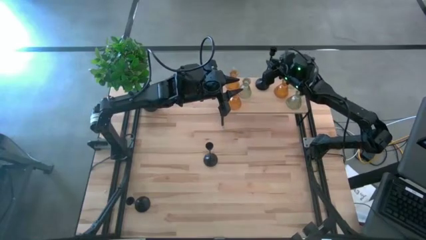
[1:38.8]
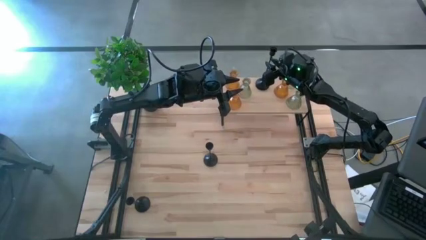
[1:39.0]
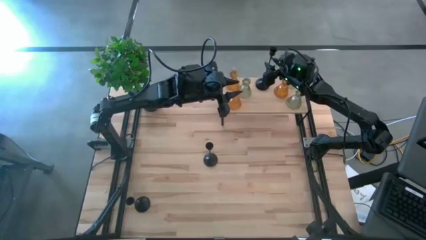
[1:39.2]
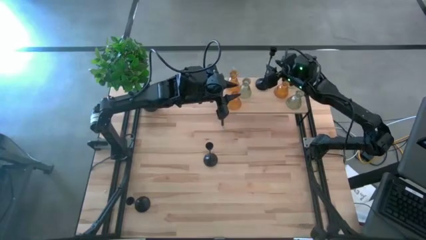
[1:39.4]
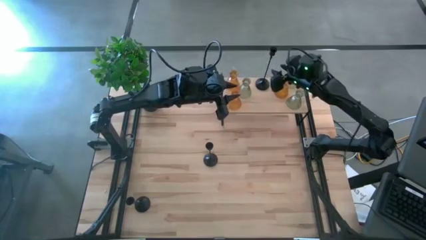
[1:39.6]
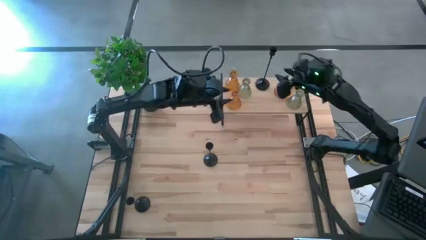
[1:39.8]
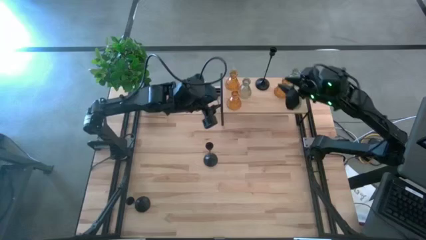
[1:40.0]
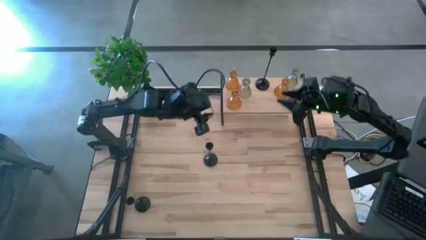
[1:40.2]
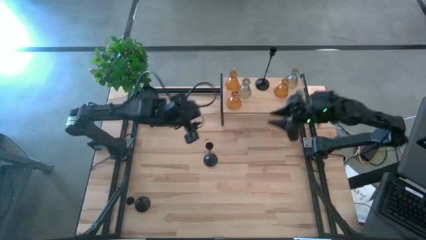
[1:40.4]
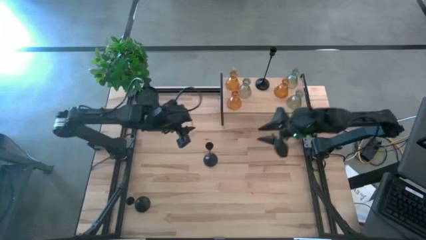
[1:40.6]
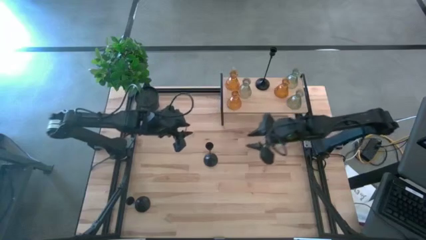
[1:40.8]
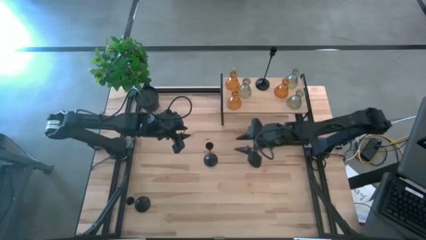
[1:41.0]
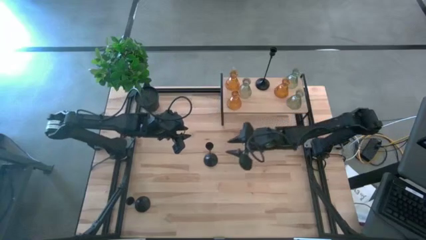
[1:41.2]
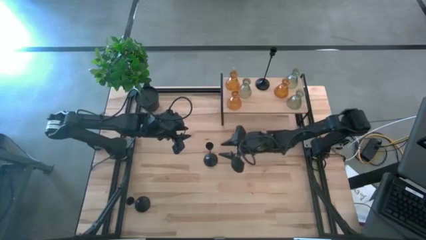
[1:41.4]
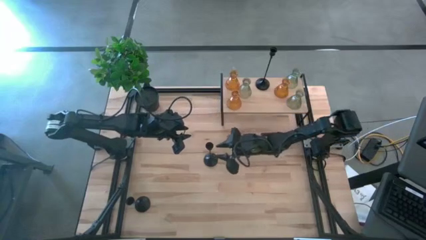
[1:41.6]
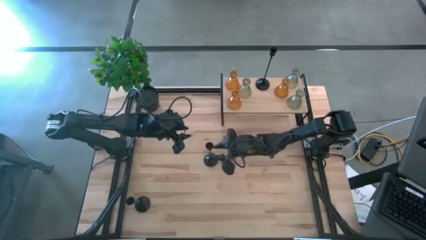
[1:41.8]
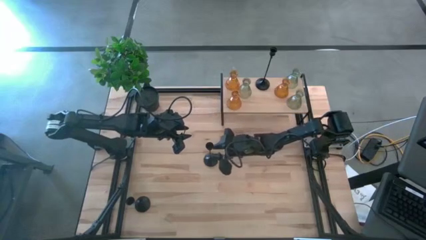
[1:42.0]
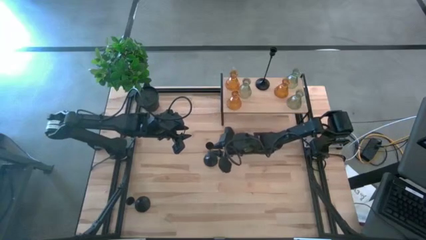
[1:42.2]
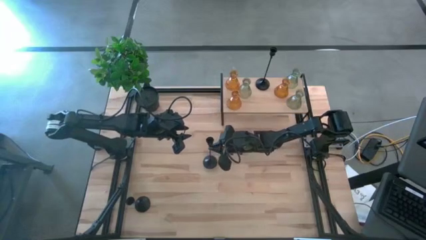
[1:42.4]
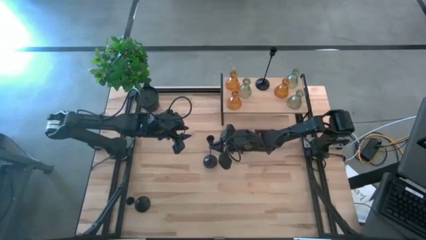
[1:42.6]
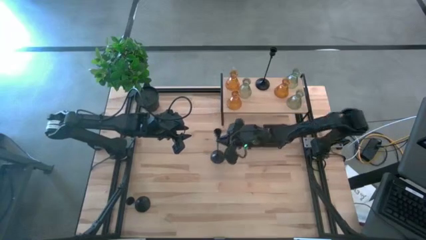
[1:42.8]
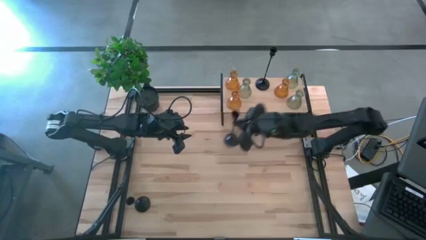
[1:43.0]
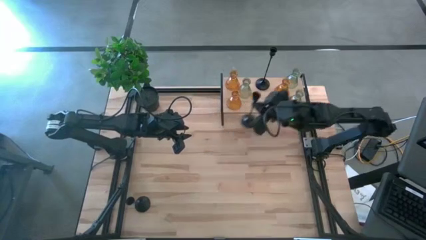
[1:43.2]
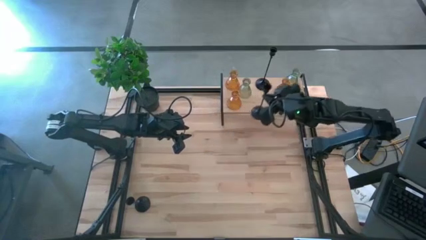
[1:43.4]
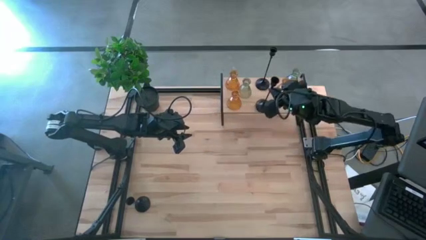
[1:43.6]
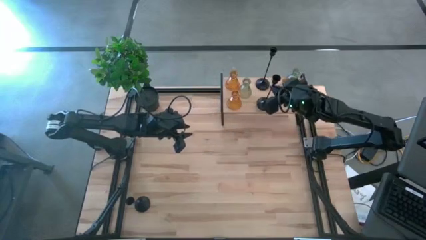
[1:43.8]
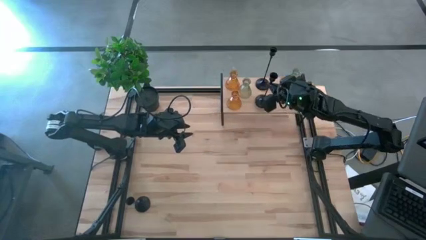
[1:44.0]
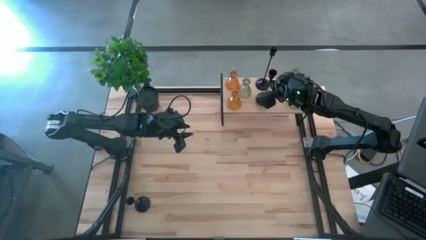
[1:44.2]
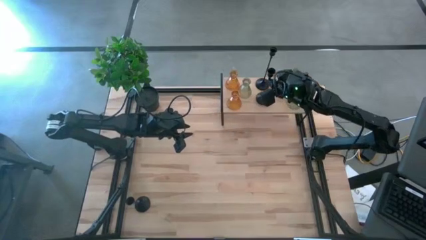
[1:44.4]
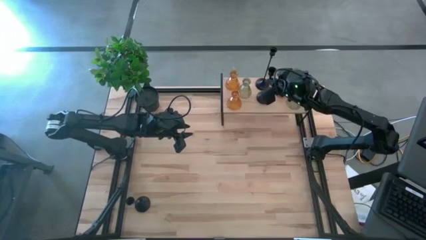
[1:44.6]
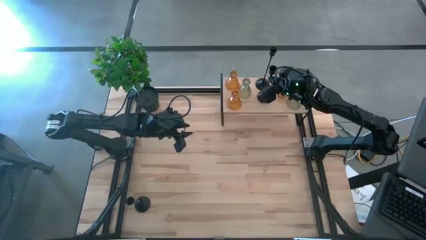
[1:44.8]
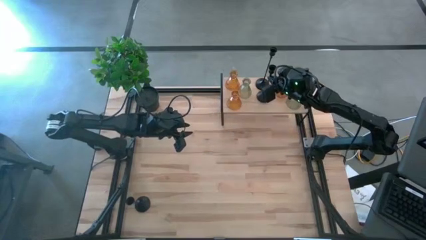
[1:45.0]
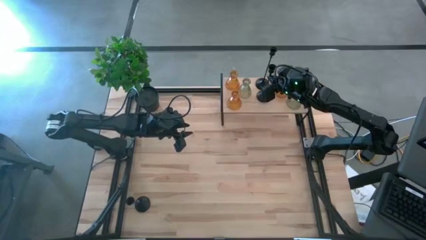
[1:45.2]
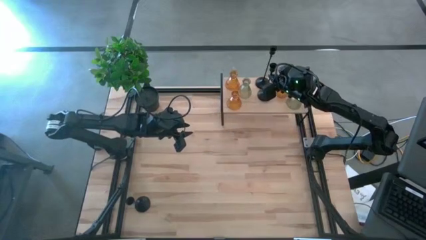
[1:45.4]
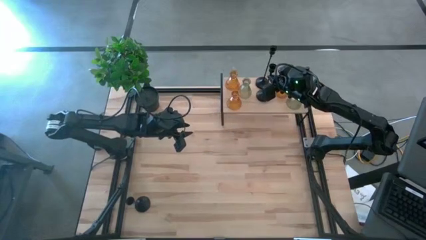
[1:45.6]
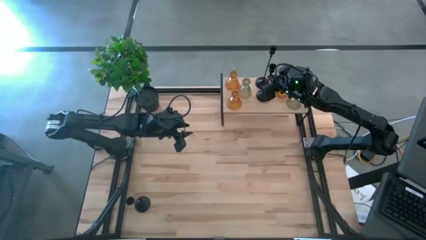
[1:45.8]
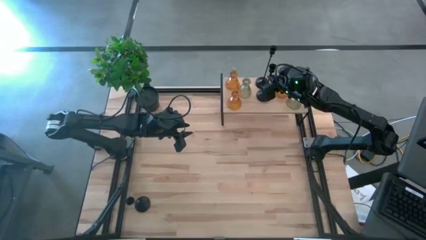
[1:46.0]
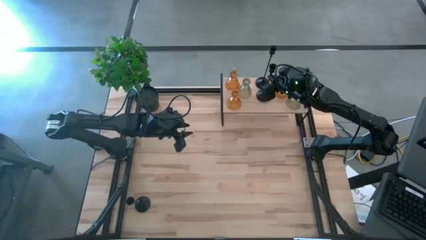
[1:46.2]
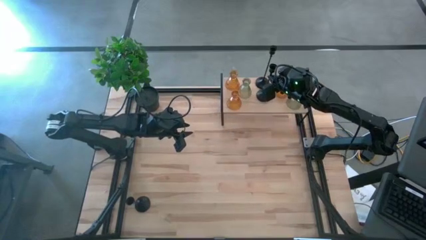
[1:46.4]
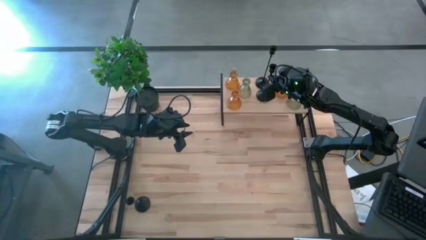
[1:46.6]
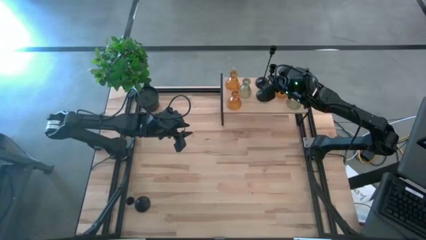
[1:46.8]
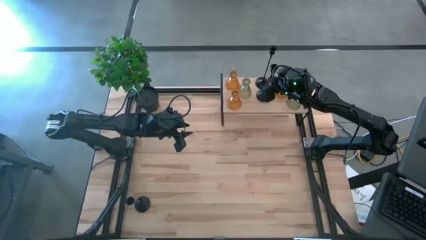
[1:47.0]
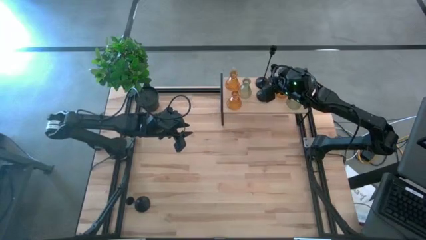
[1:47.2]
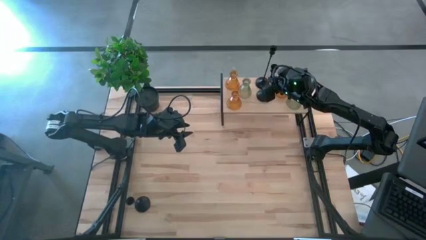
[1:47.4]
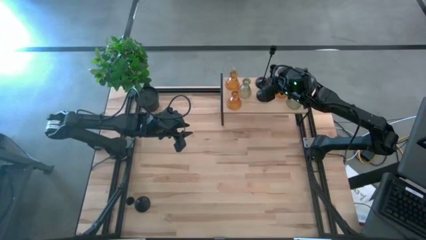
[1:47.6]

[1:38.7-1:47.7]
Task: Pick & Place candle stick holders
Put the top black candle holder on the shelf

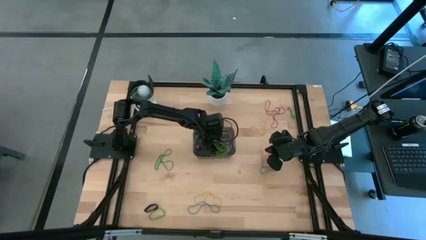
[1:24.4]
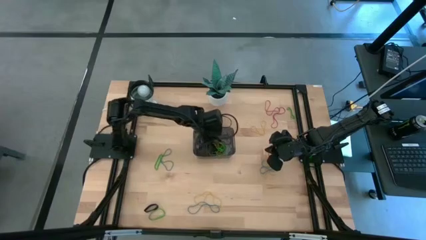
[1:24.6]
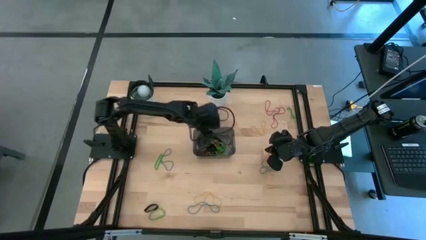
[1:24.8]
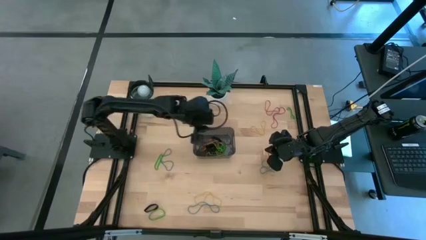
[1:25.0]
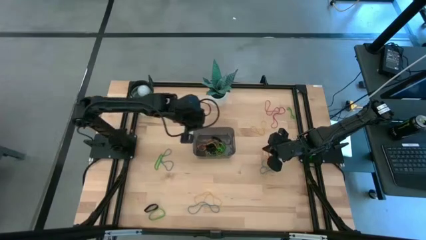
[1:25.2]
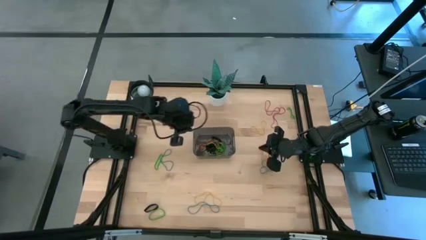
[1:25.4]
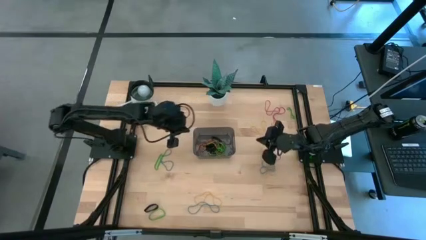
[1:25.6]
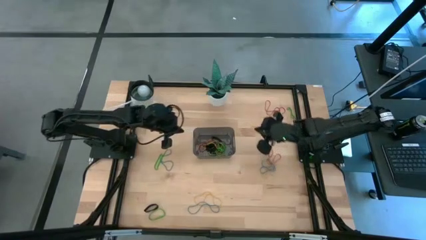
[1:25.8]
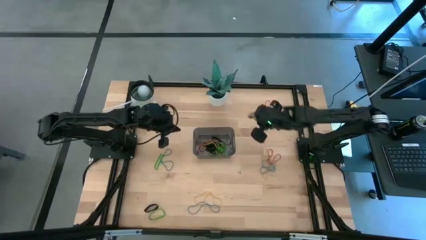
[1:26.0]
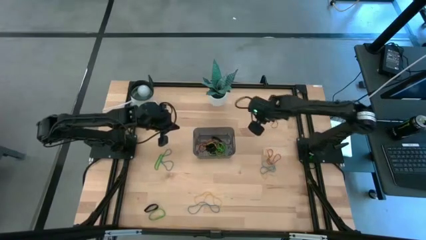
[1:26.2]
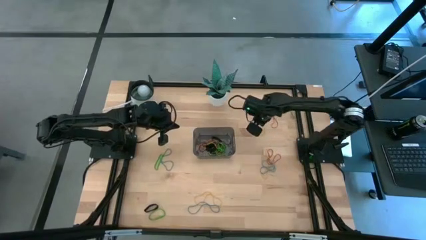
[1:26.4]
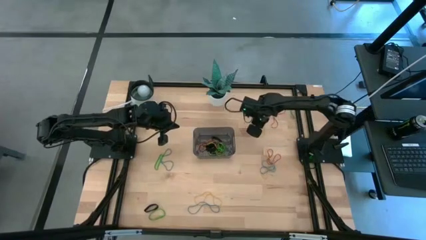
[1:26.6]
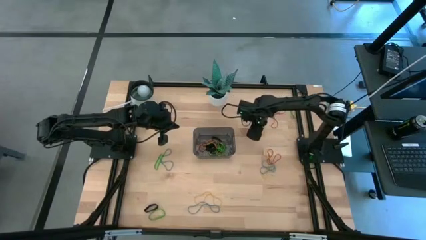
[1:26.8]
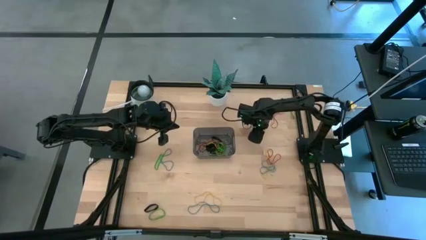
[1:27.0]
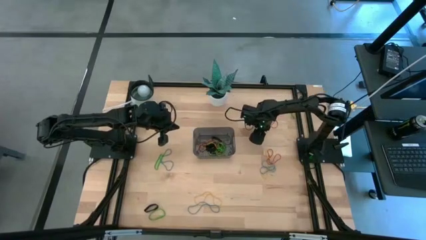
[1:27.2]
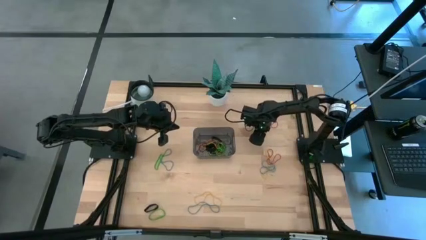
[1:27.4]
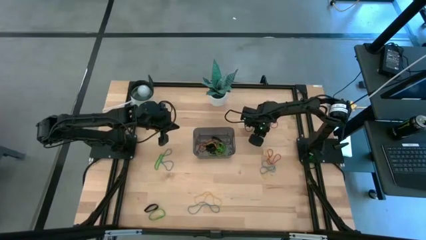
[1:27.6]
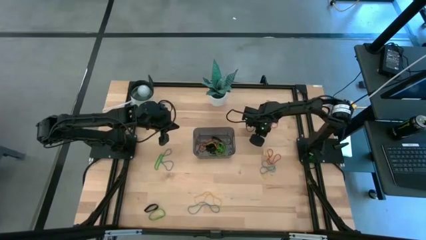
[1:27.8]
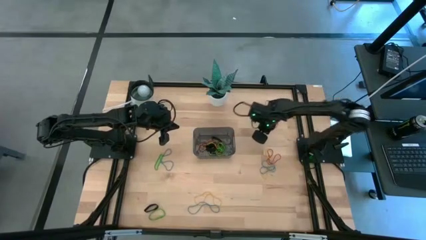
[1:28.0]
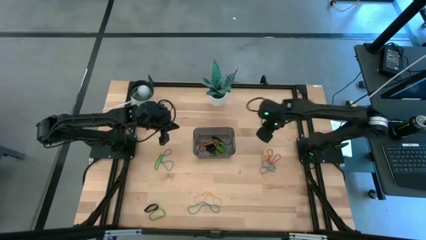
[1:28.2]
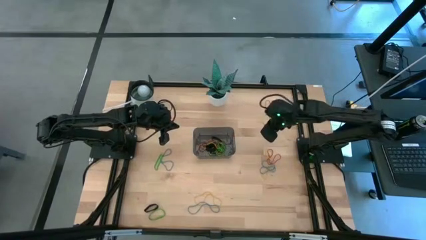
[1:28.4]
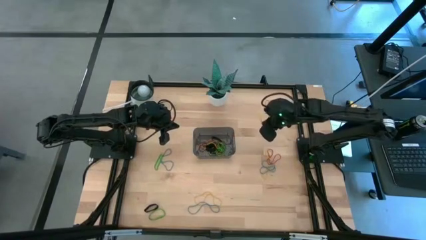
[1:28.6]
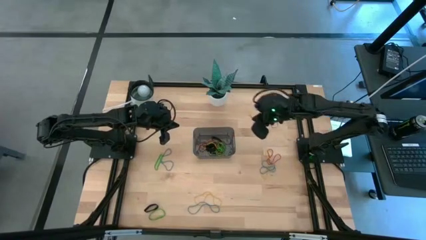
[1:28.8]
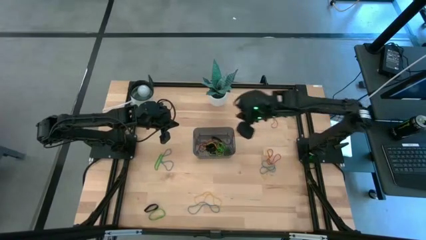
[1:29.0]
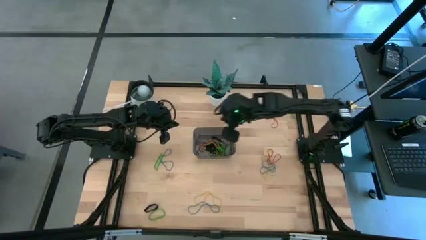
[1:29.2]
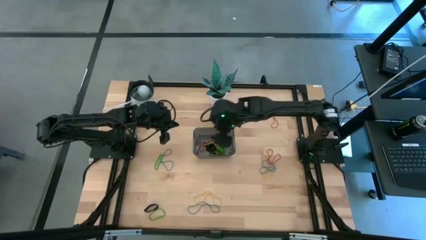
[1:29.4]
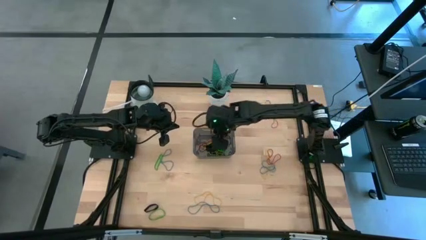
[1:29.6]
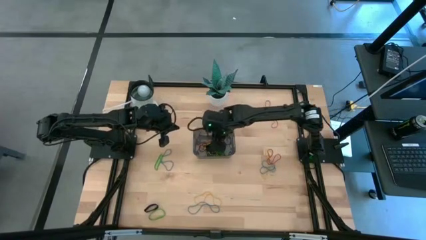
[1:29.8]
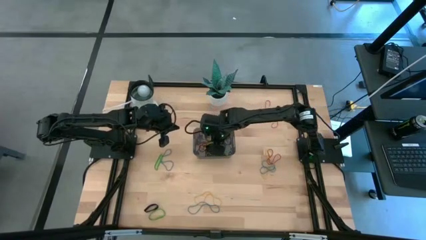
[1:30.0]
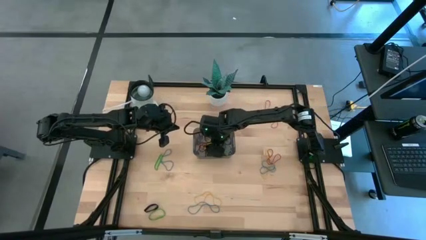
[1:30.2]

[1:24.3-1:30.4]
Task: Pick and place rubber bands into bin
Put the yellow rubber band into the black bin
